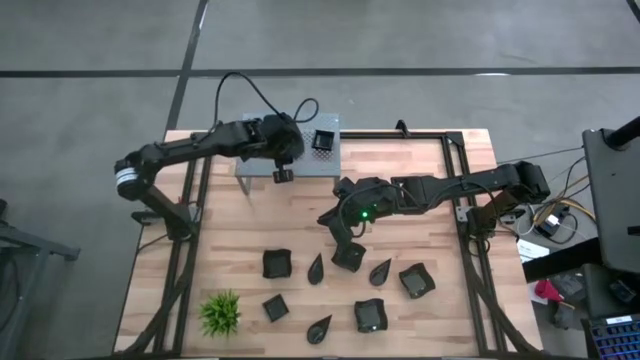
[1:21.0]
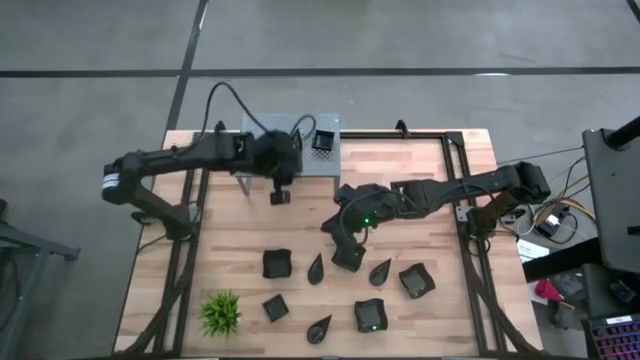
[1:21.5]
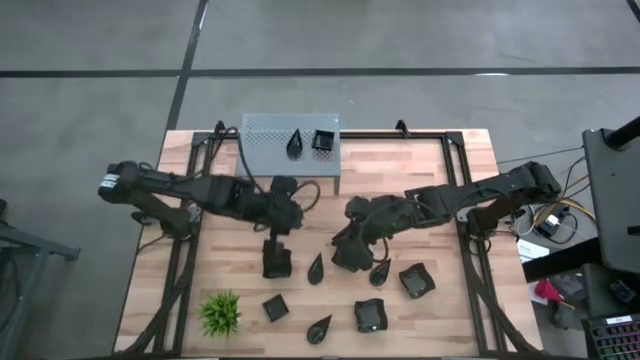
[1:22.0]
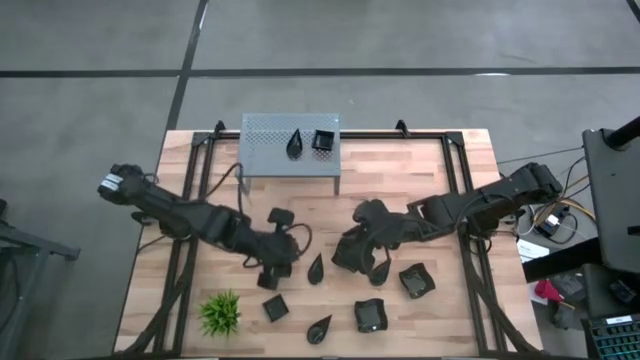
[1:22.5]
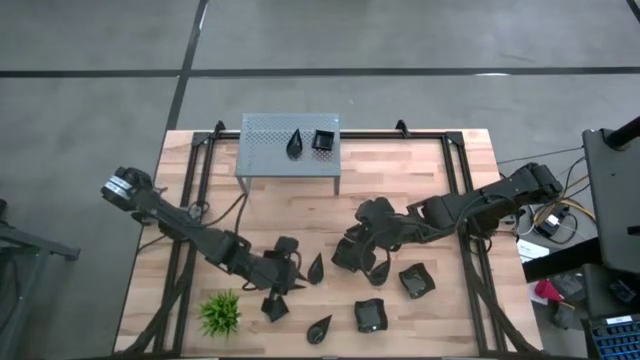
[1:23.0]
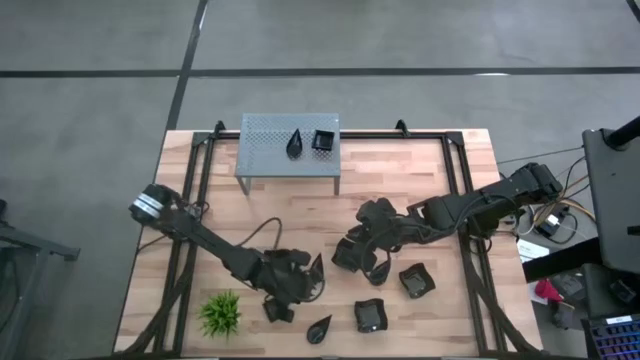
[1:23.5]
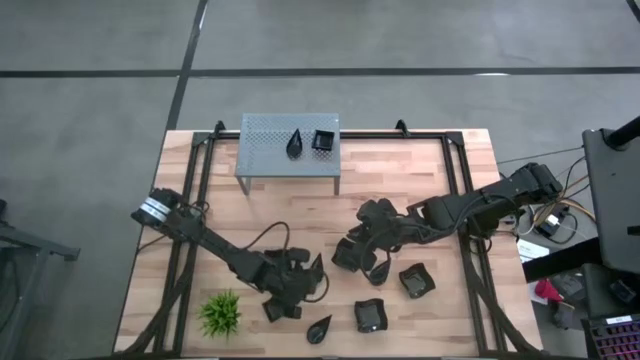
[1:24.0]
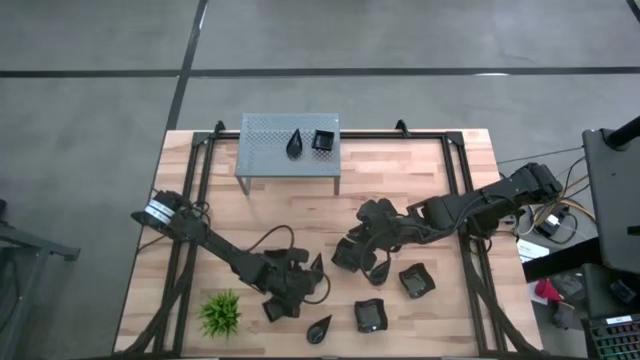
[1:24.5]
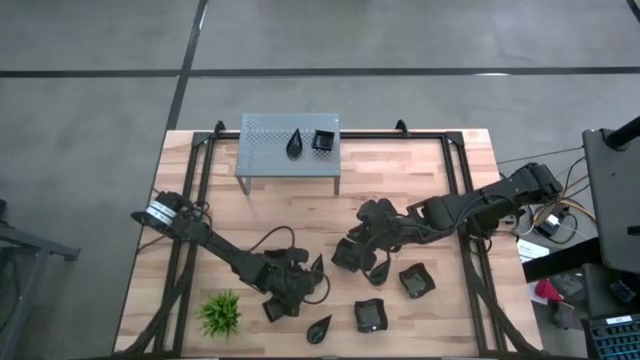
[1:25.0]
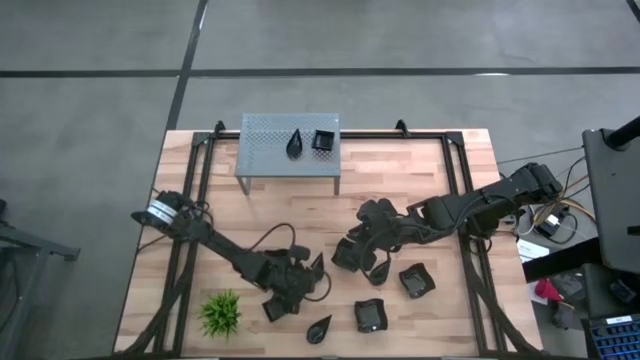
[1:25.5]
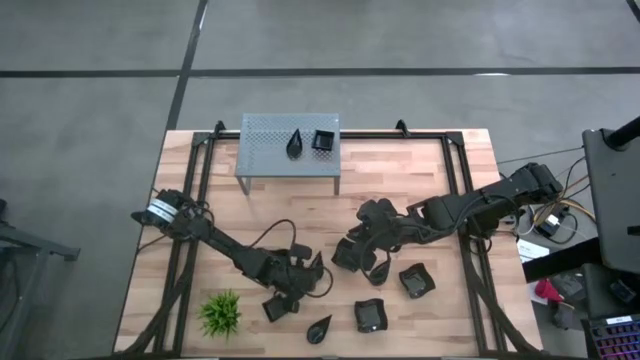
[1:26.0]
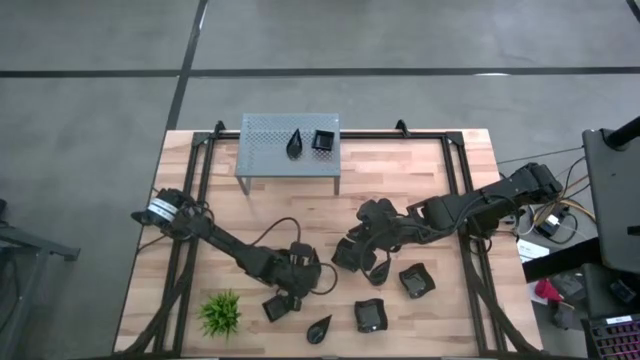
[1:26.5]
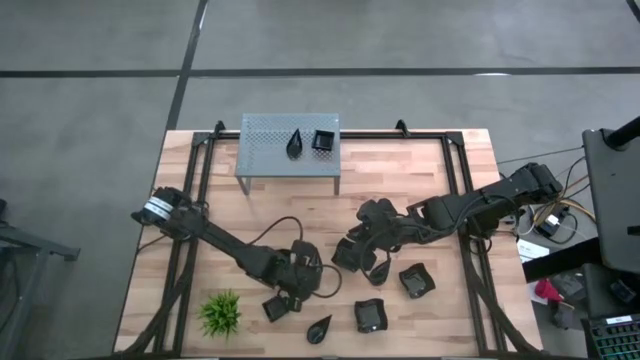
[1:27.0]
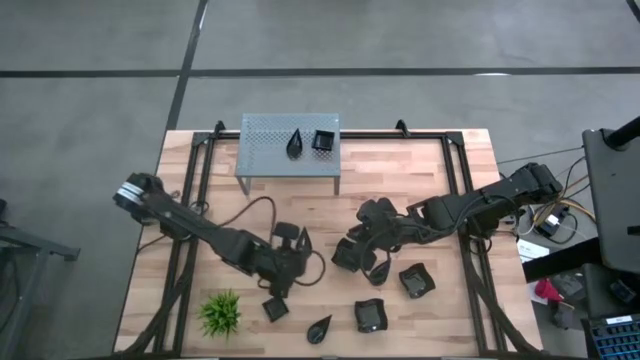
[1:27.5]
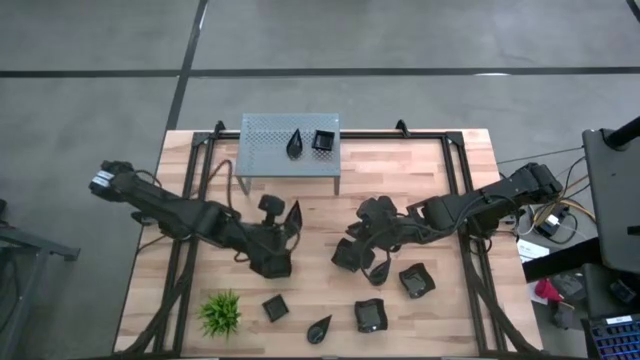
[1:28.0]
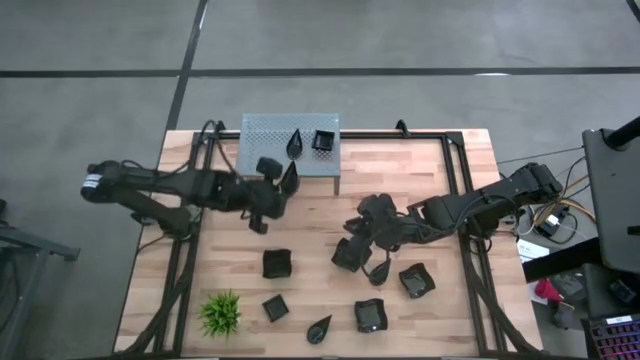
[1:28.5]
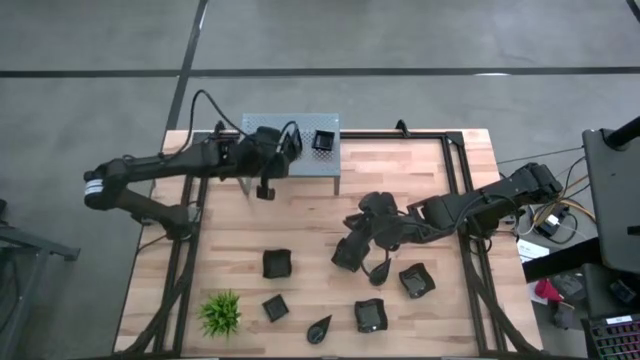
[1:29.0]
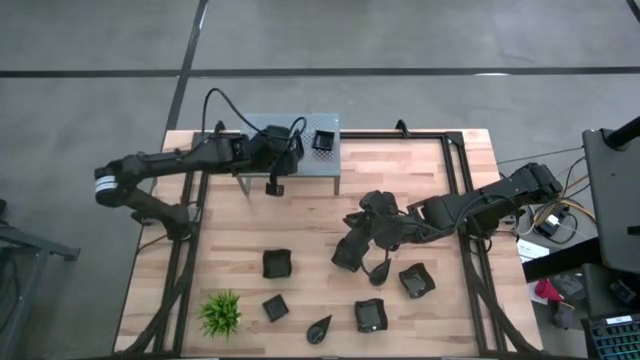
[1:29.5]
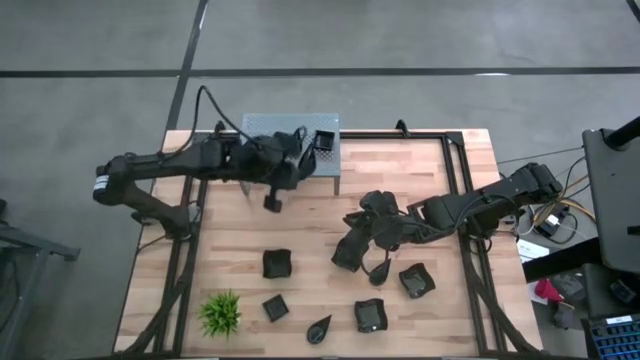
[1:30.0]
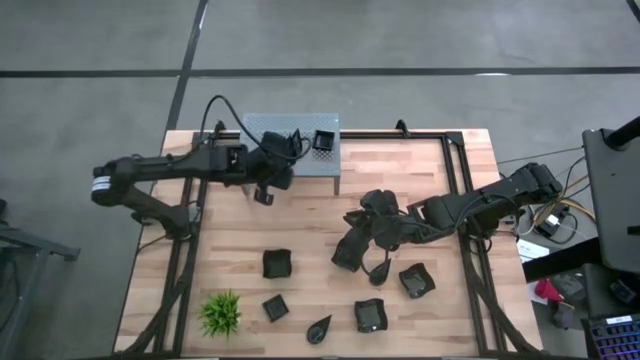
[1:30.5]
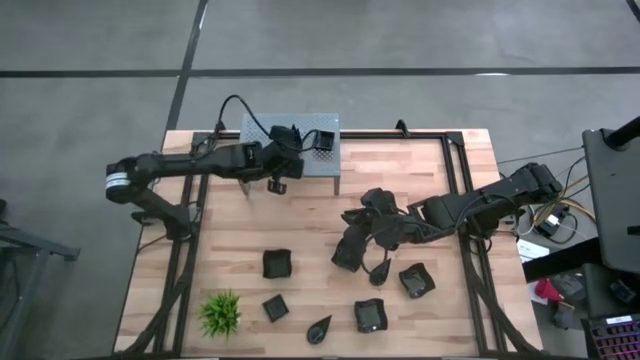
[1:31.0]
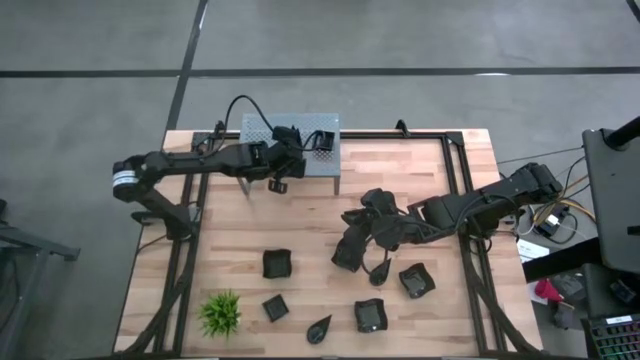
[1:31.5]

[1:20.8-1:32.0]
Task: Pick & Place Mini shaped plates
Stack the middle left drop-shaped plate on the other drop plate on the shelf

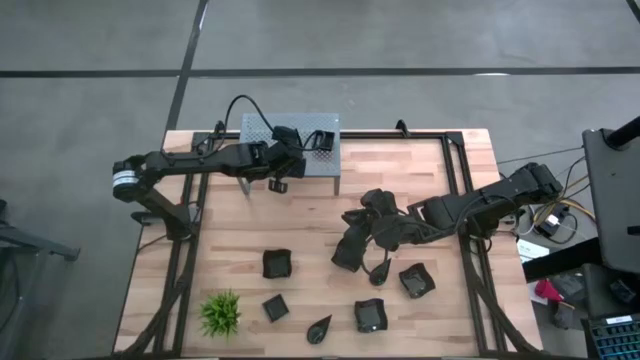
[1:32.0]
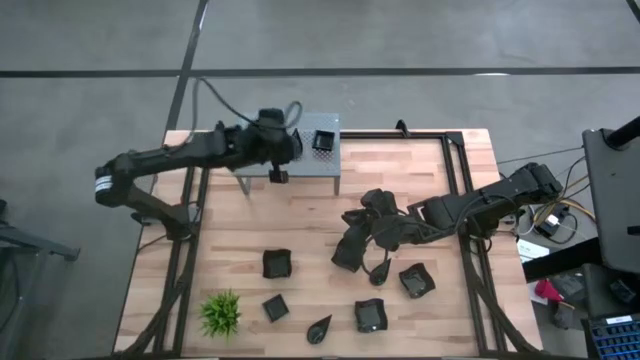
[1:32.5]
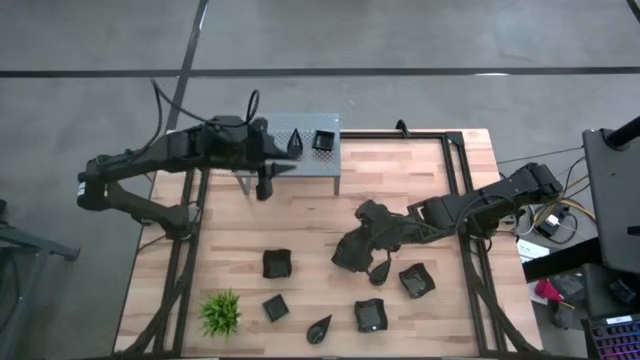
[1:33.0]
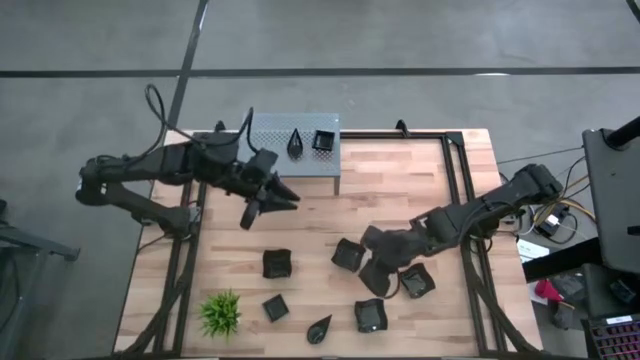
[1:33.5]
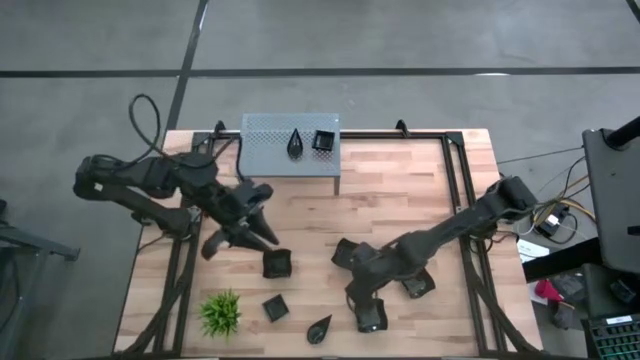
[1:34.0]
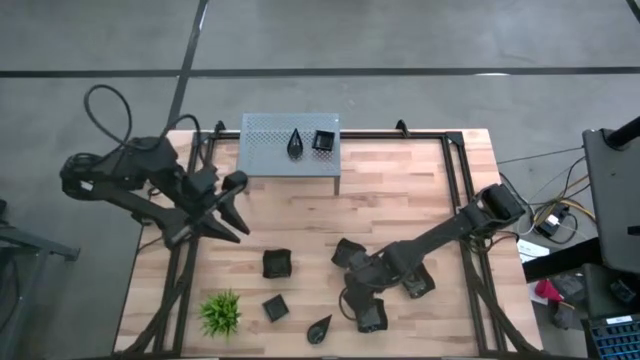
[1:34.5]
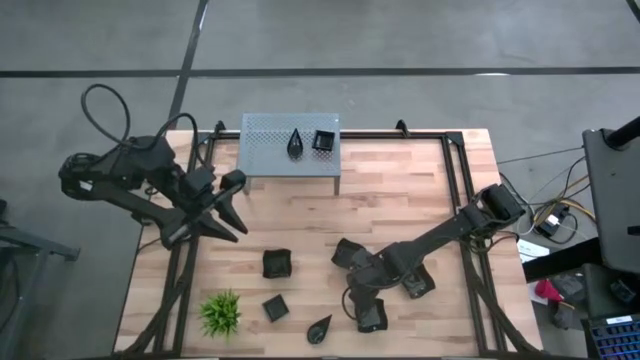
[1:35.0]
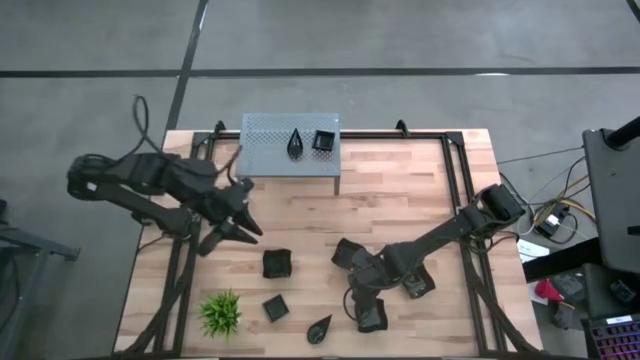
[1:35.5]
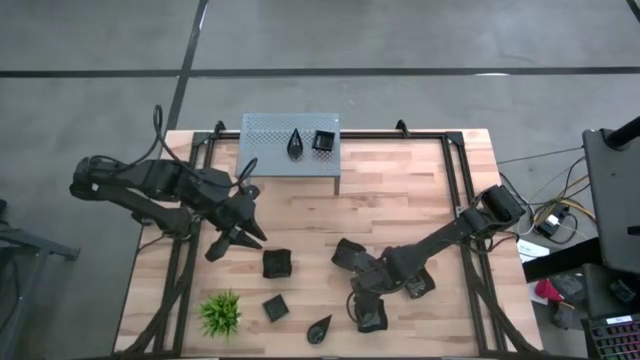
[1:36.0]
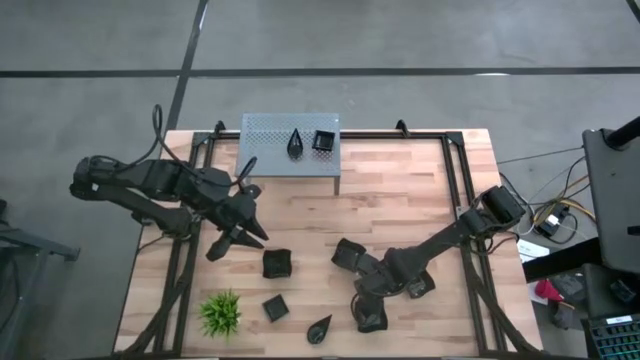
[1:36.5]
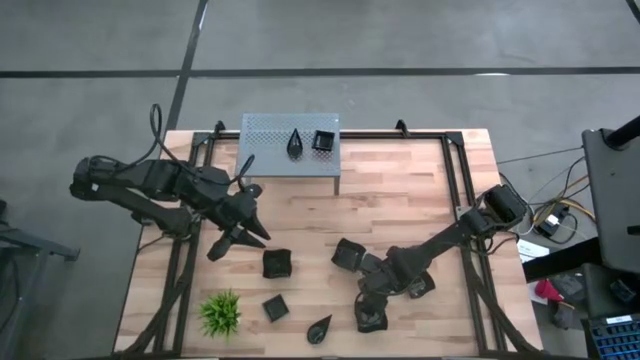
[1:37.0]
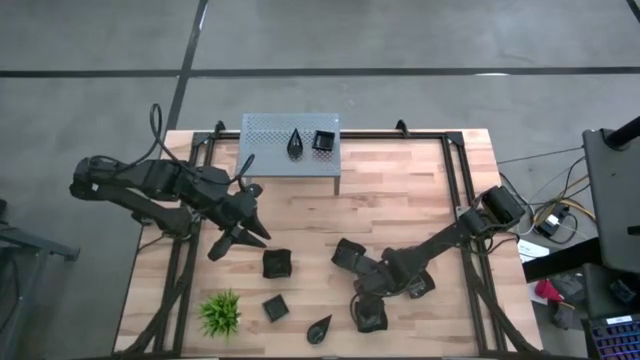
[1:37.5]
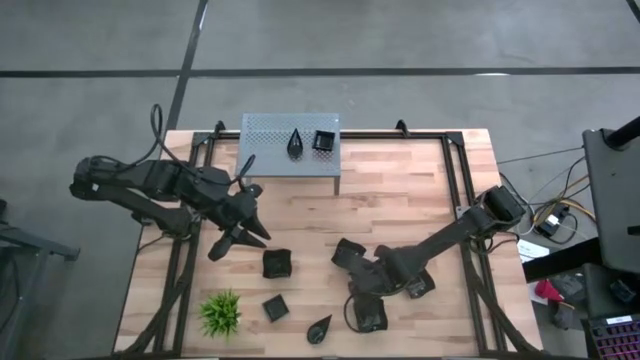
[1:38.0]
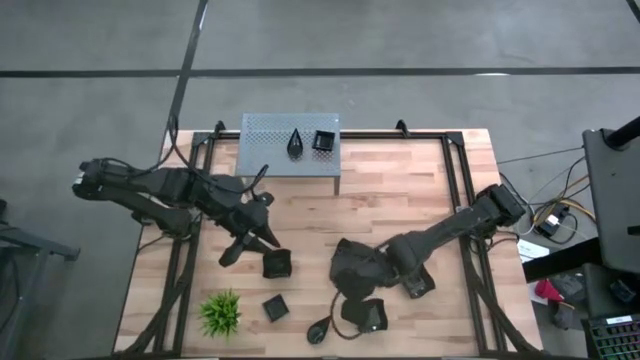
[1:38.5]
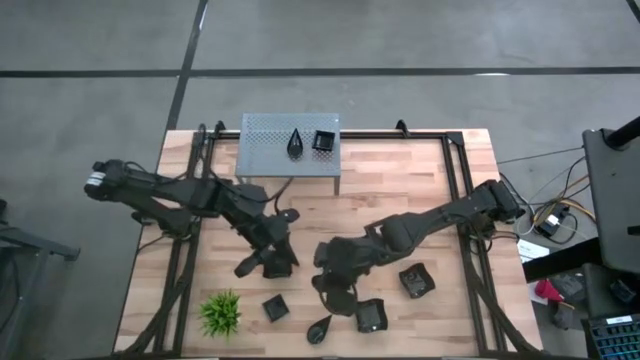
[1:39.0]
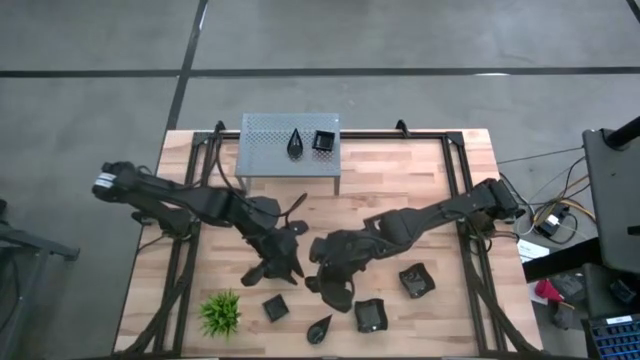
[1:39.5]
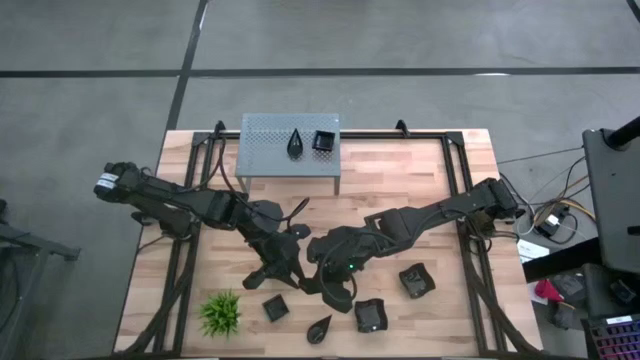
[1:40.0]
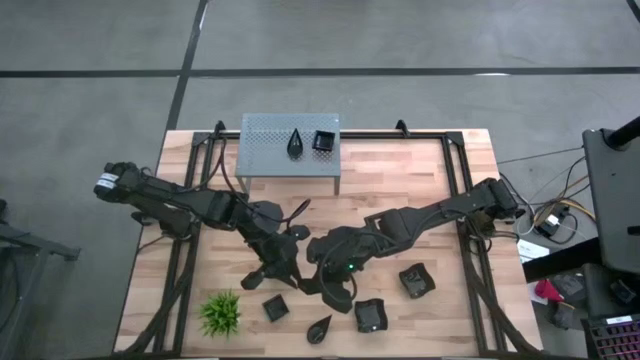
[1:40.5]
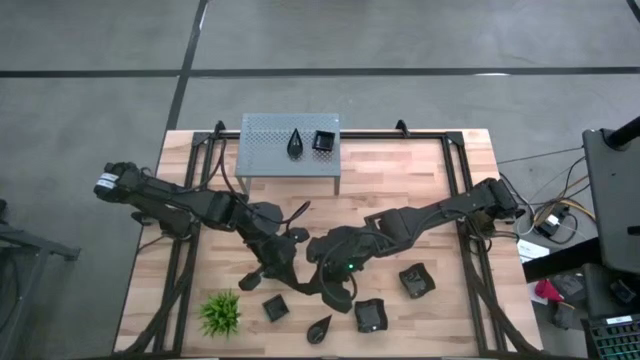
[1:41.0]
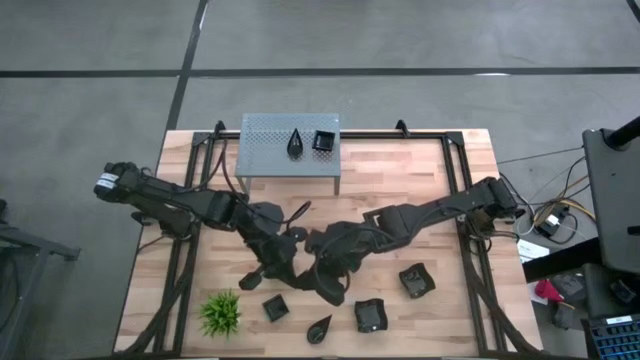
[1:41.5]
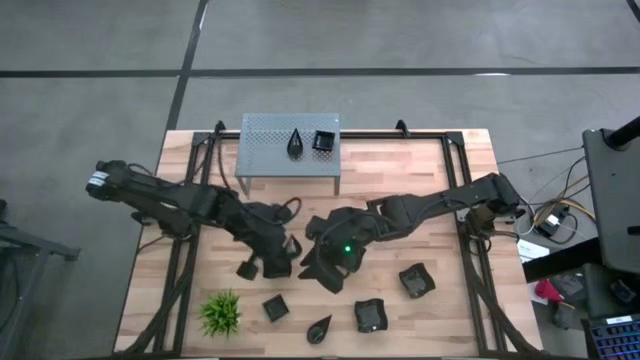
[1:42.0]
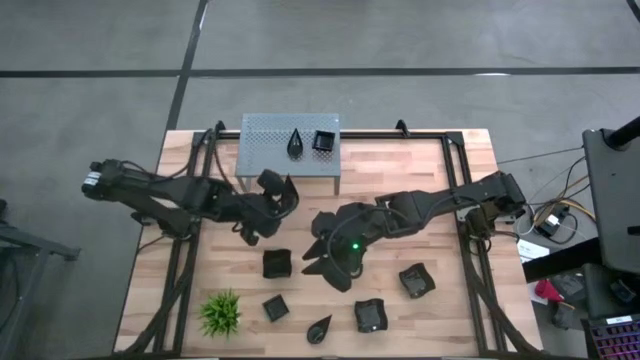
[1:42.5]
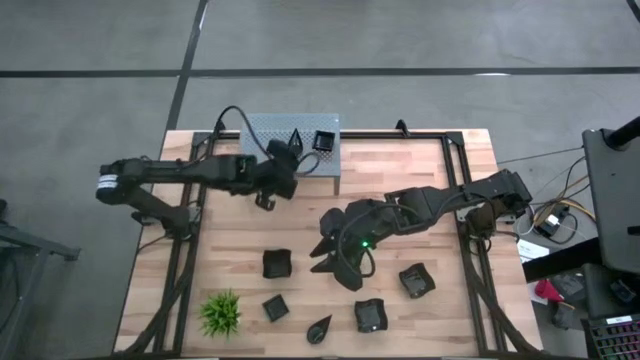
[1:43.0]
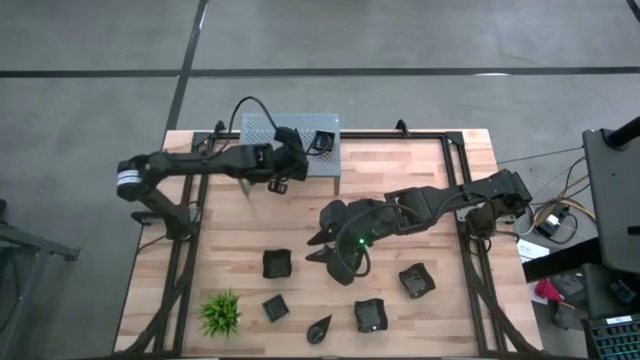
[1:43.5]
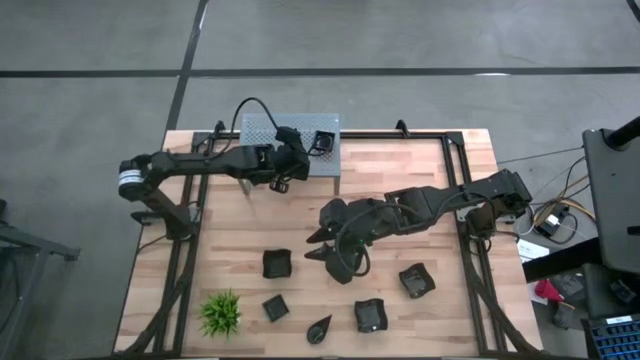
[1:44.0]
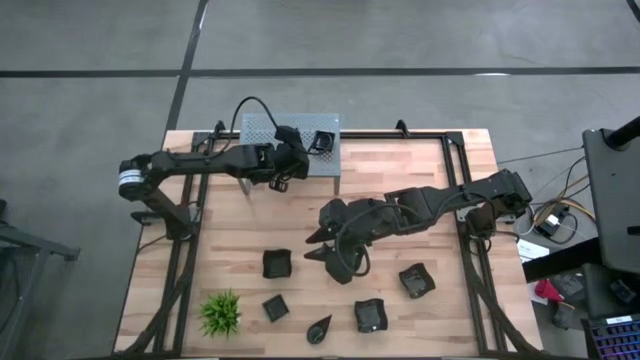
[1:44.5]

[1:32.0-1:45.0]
Stack the middle right drop-shaped plate on the other drop plate on the shelf
